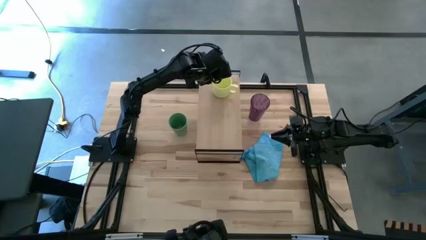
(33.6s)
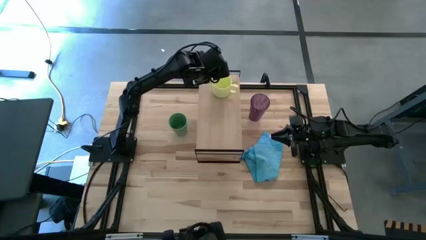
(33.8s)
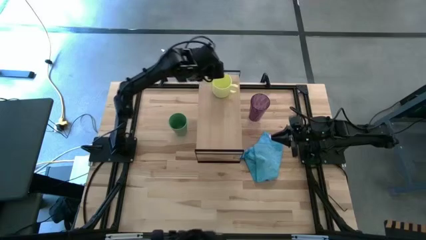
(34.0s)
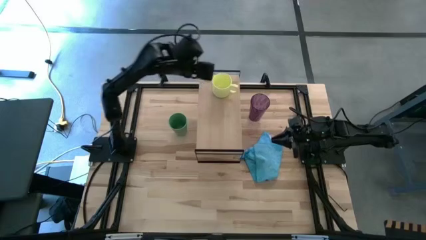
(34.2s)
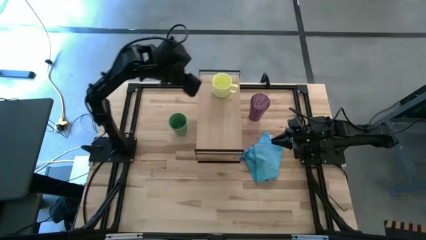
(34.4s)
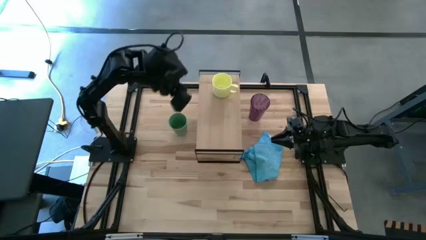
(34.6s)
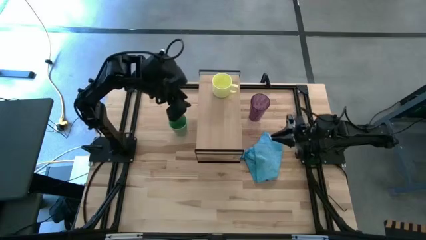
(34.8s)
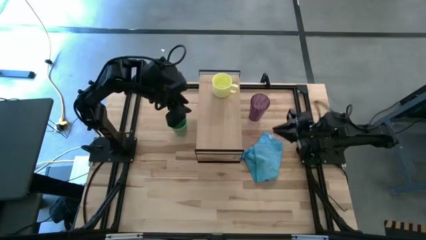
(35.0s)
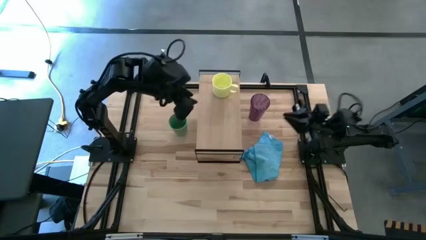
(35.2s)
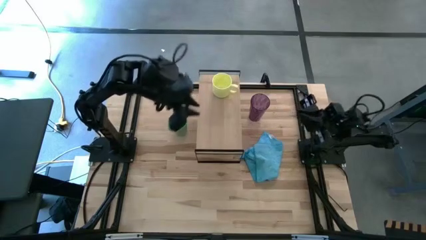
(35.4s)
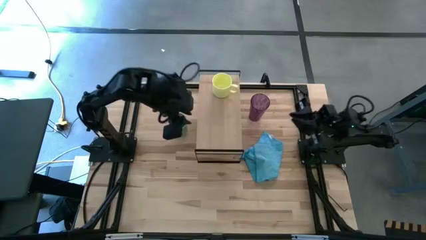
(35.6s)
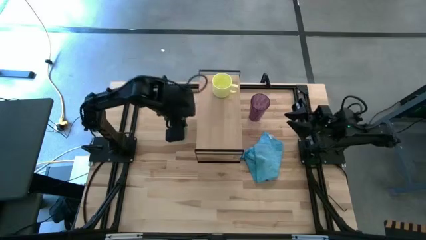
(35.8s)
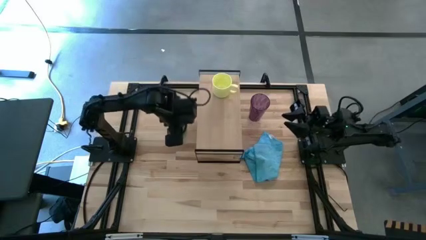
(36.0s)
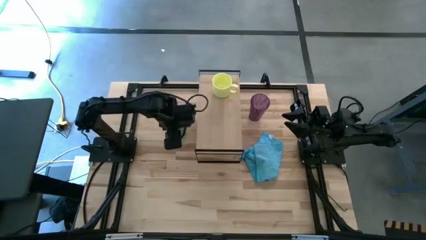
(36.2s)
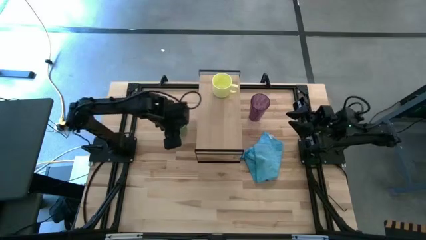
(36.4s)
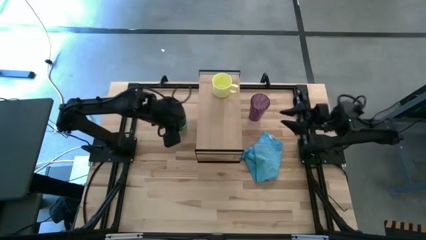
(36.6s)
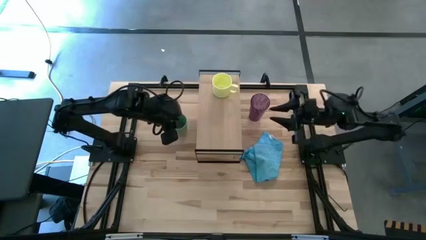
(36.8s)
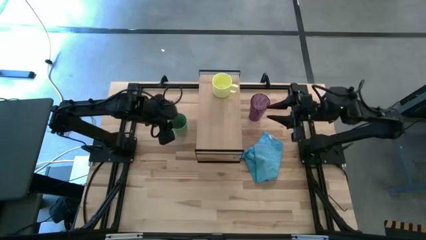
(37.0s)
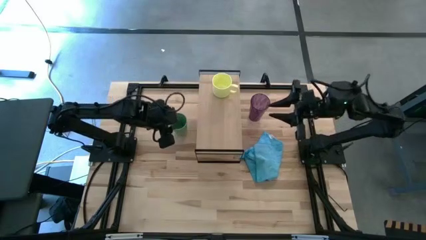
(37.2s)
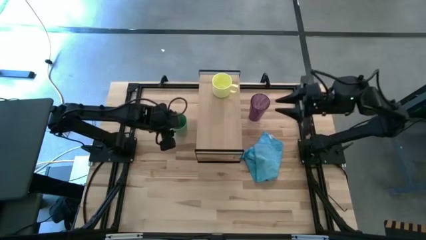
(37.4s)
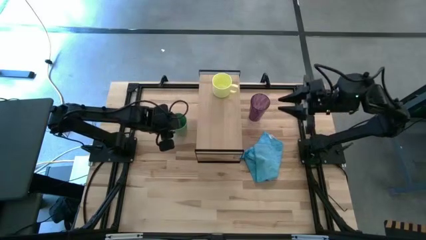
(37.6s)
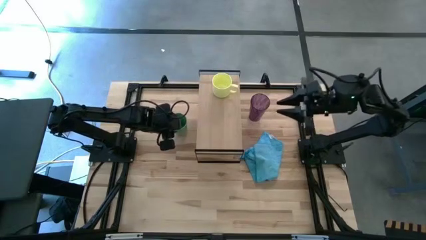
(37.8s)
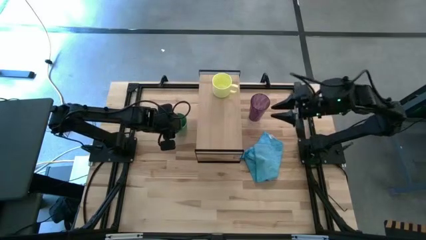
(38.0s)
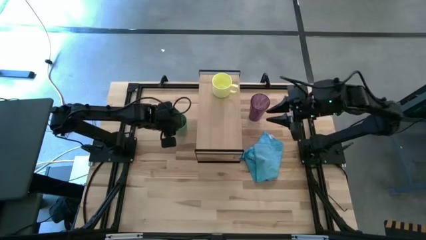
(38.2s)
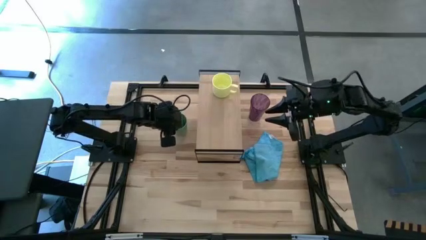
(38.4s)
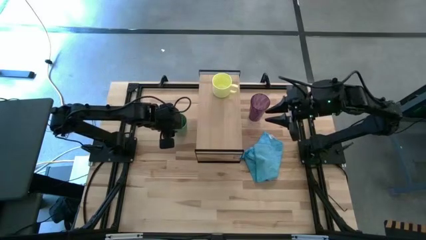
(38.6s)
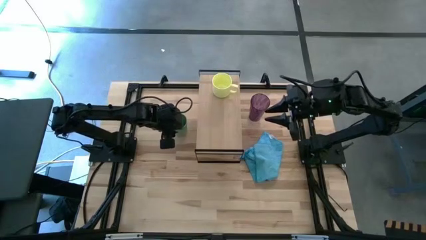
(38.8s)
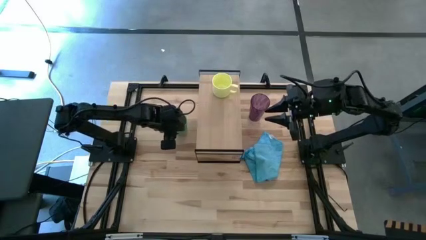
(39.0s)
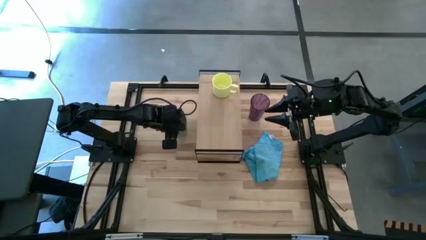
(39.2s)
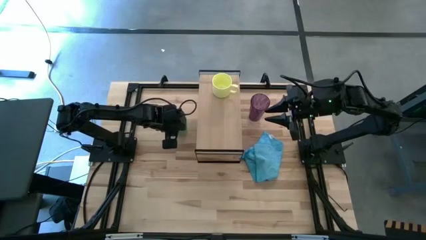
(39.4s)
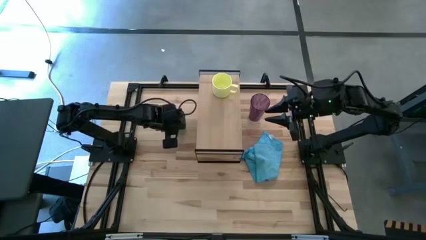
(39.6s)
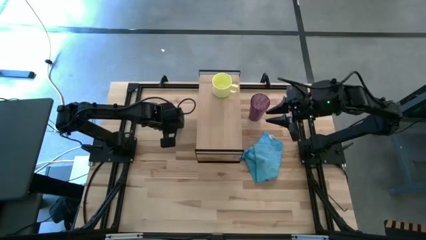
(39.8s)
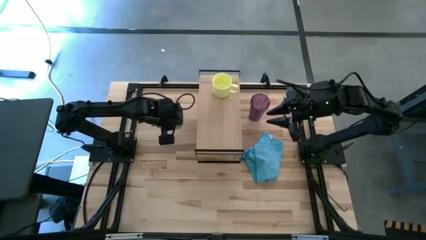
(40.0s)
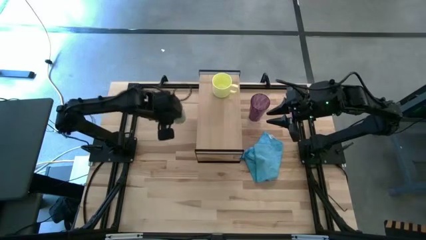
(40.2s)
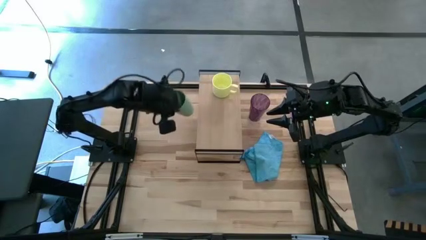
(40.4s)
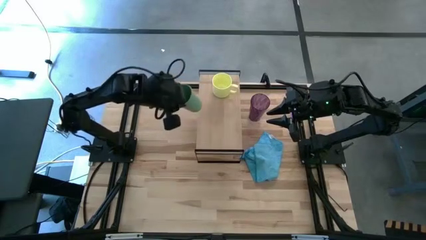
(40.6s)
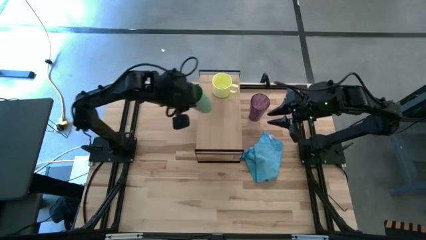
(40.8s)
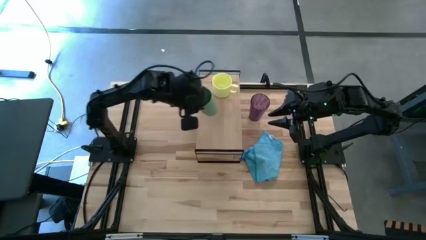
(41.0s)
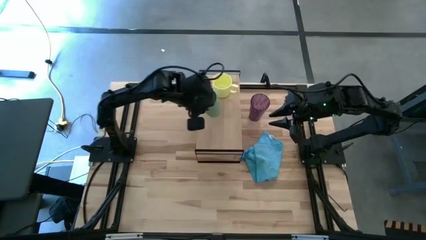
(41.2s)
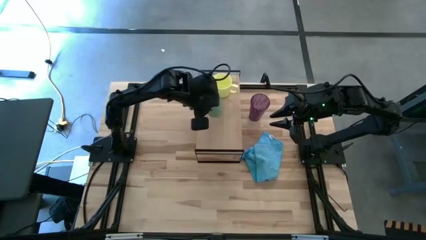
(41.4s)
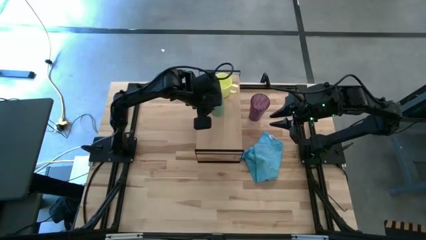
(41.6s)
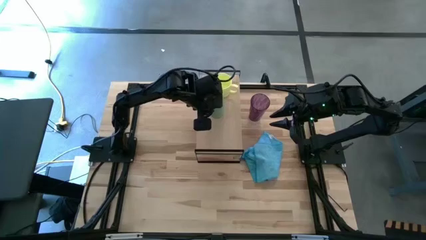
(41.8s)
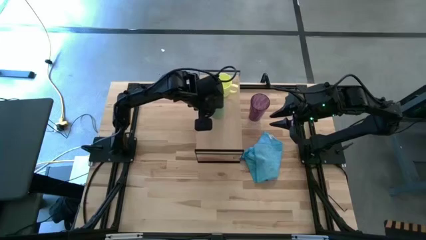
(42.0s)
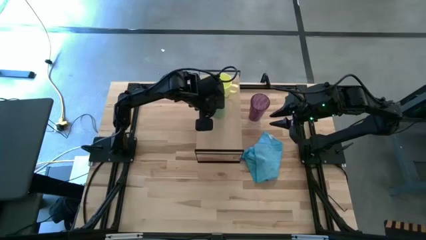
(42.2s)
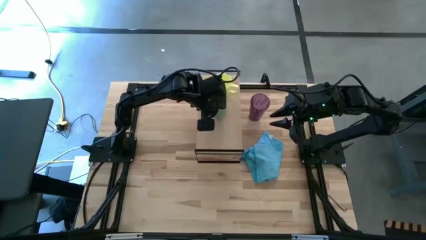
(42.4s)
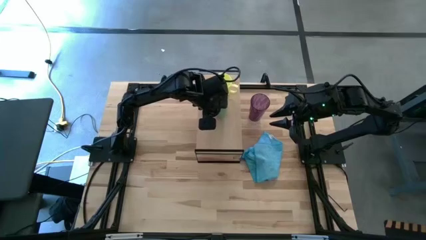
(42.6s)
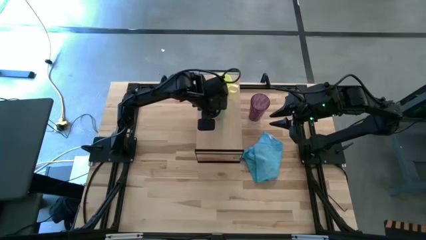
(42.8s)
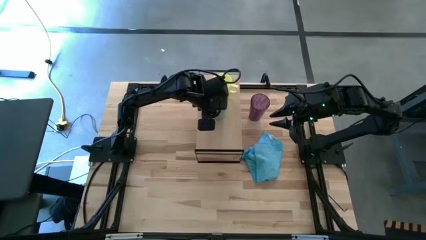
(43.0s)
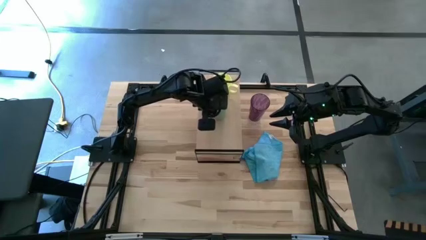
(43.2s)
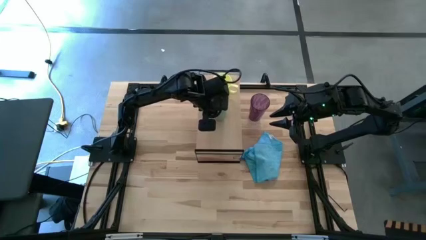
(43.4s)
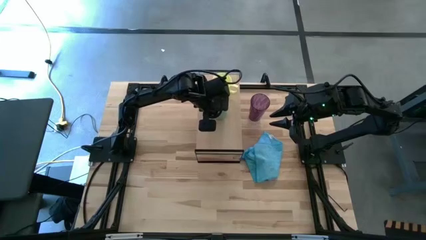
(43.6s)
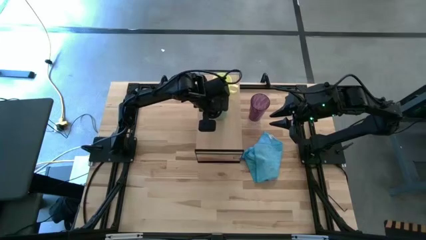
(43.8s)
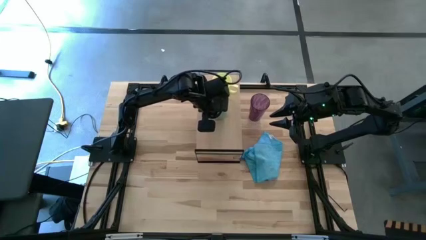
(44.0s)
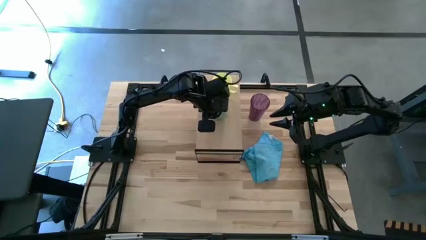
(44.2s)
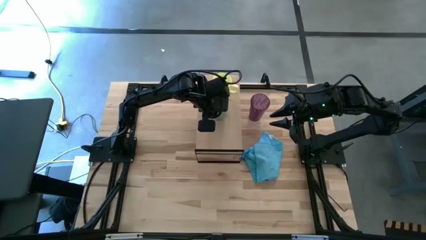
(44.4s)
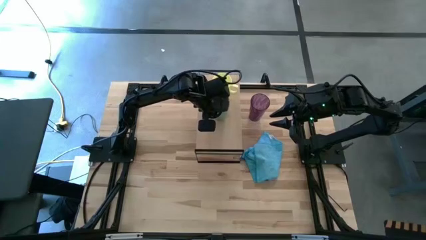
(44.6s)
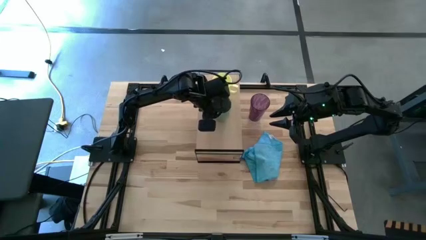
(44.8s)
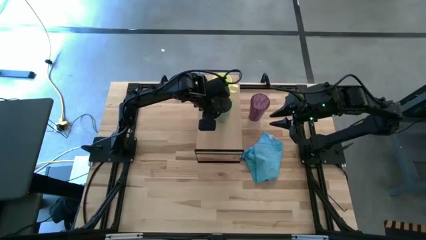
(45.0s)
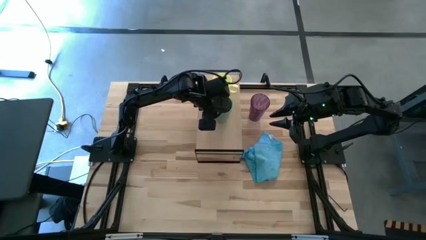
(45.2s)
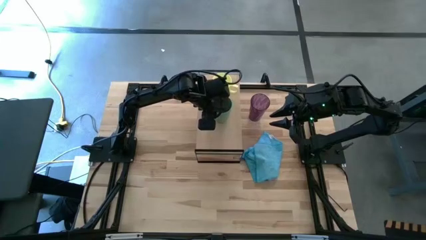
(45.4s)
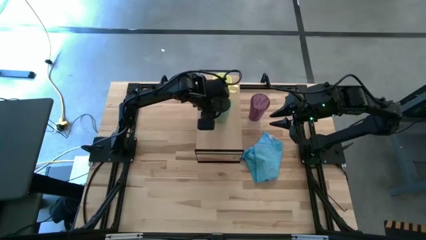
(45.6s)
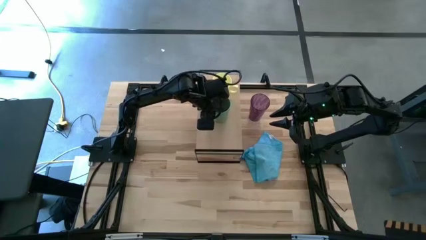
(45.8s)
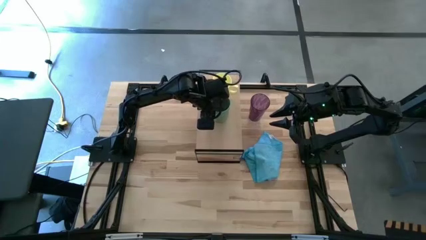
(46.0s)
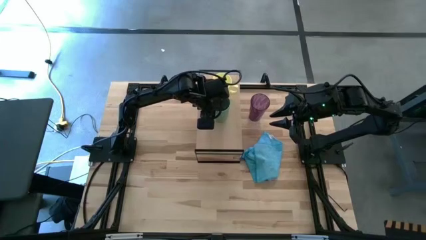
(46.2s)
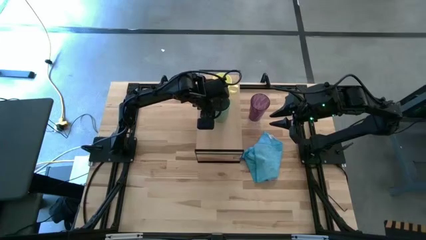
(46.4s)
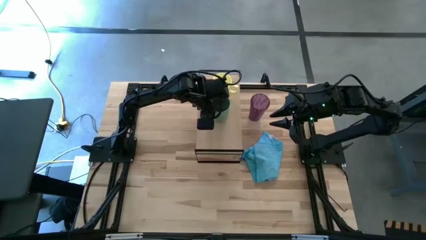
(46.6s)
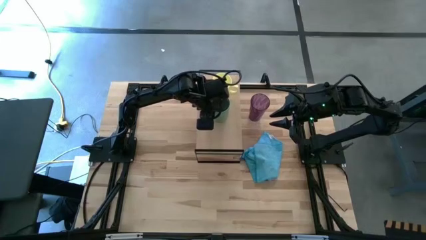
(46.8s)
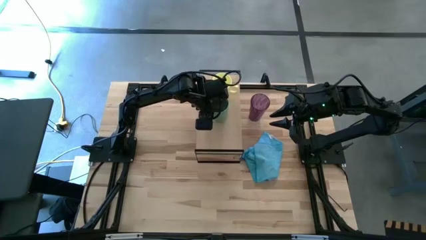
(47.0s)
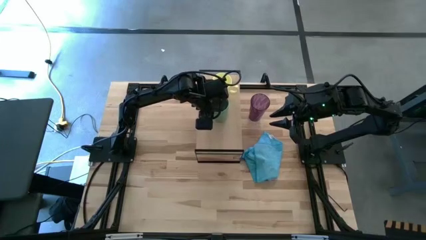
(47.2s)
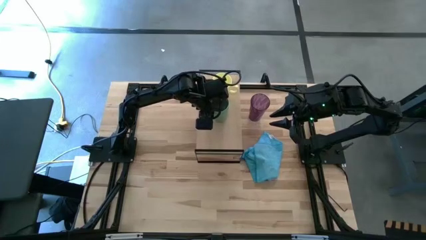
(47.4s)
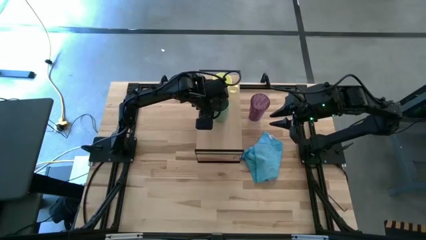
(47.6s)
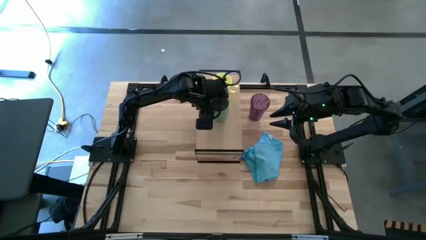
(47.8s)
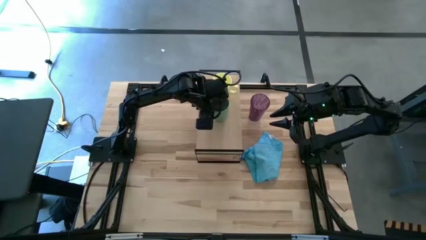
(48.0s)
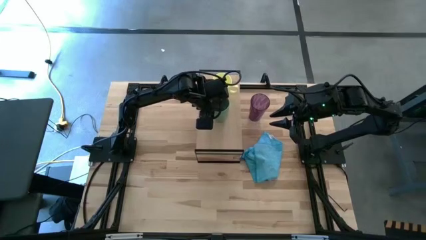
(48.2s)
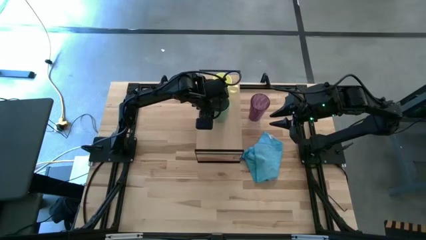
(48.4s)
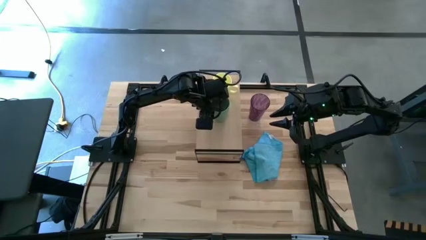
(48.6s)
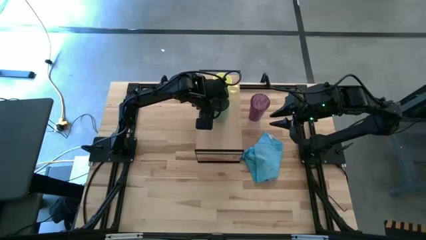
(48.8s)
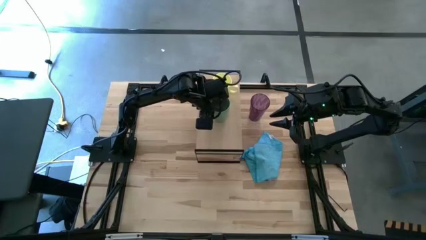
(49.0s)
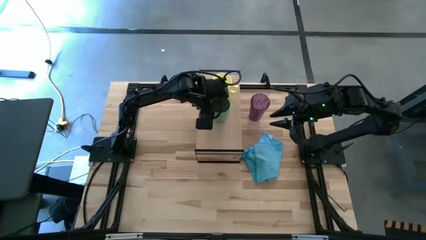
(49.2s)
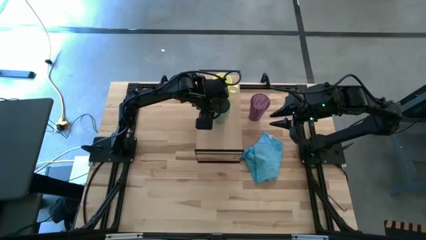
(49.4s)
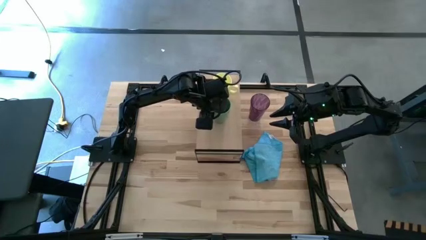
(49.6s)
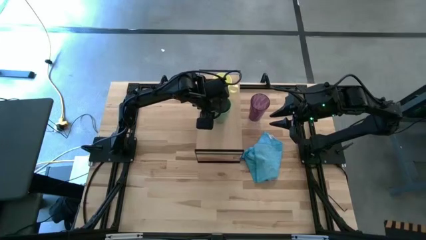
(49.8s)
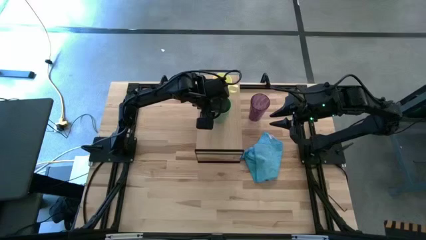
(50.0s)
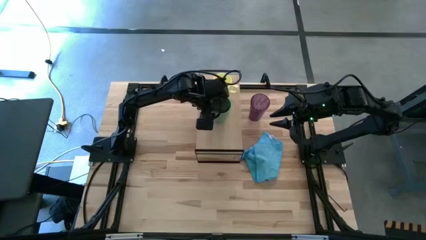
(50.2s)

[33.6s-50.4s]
Task: Stack small to large cups/mugs on shelf
Put the green cup on the shelf
